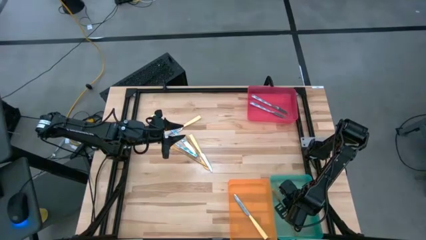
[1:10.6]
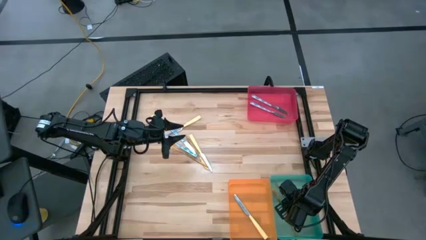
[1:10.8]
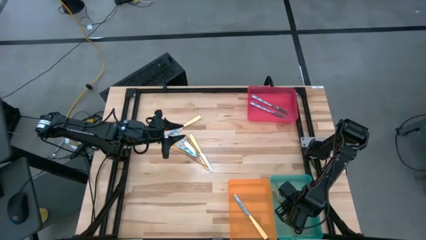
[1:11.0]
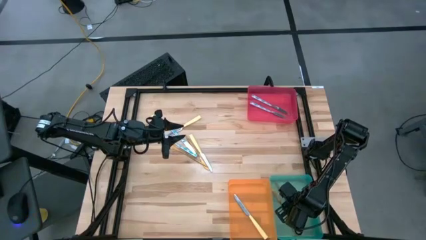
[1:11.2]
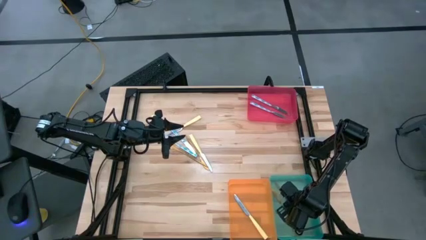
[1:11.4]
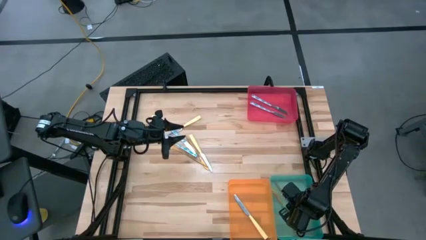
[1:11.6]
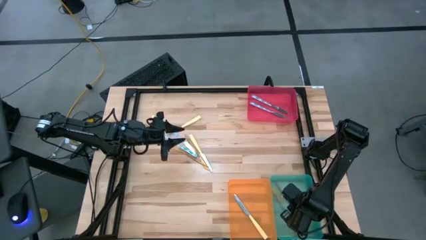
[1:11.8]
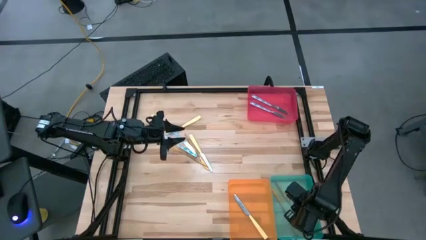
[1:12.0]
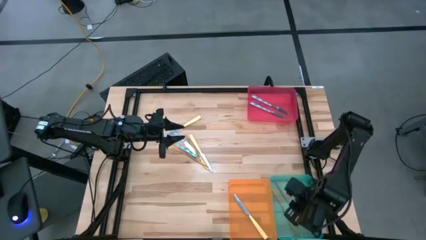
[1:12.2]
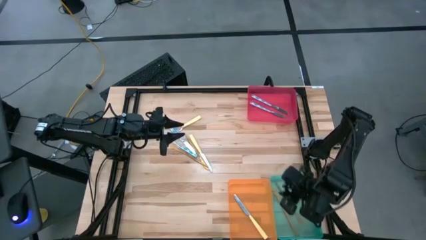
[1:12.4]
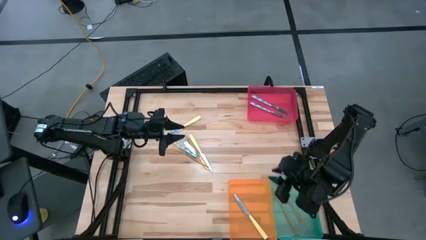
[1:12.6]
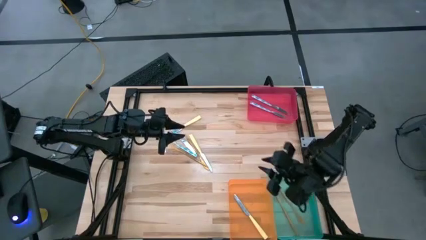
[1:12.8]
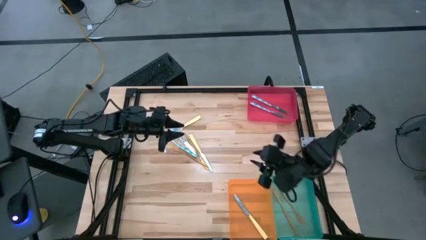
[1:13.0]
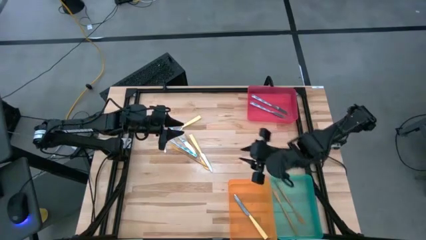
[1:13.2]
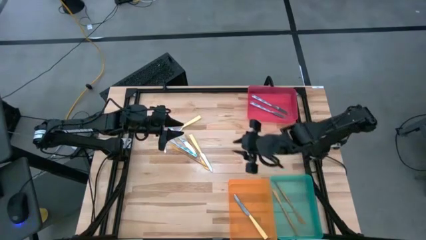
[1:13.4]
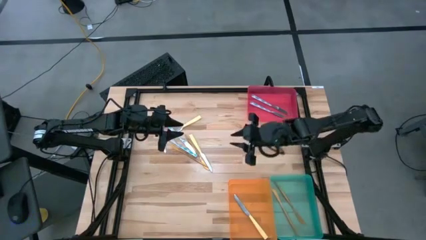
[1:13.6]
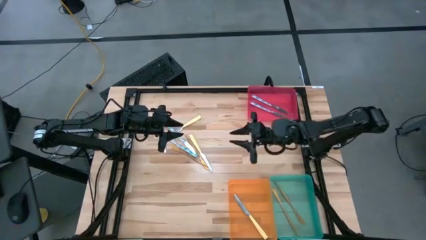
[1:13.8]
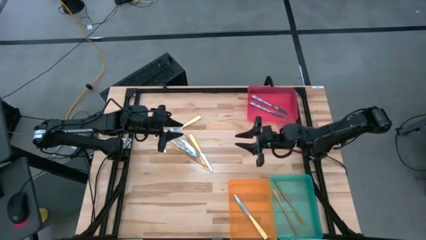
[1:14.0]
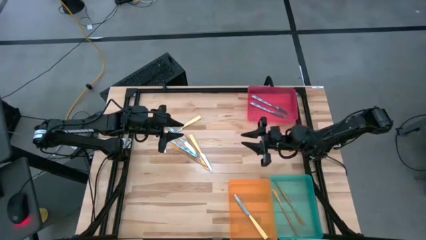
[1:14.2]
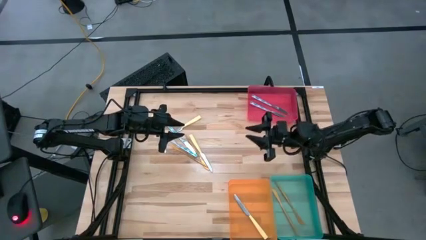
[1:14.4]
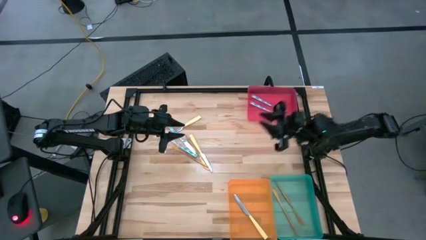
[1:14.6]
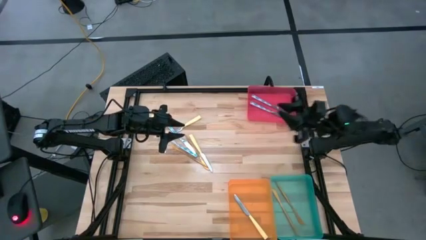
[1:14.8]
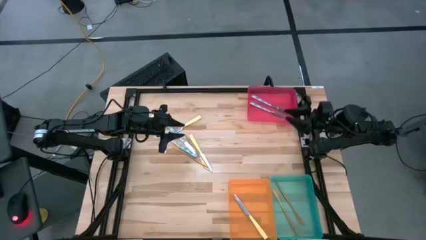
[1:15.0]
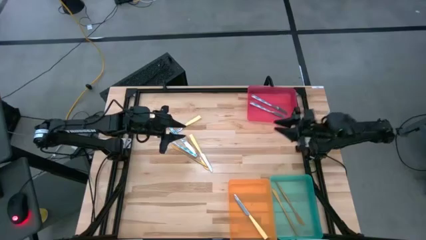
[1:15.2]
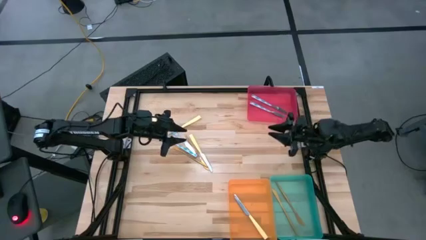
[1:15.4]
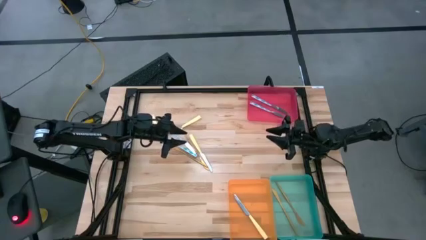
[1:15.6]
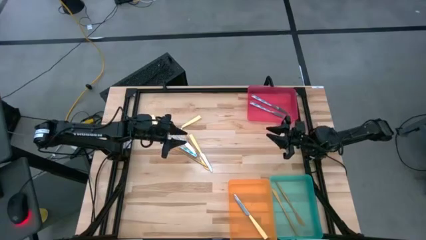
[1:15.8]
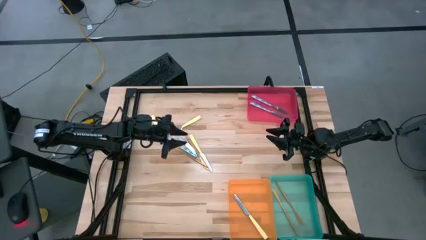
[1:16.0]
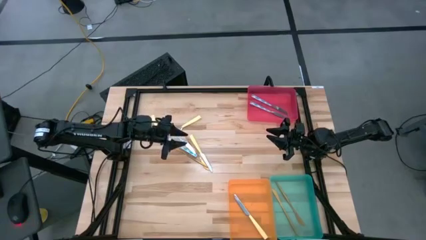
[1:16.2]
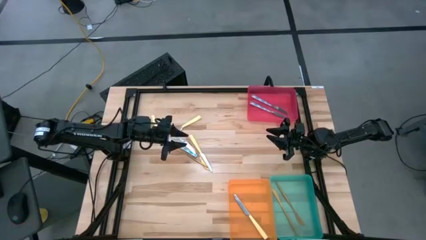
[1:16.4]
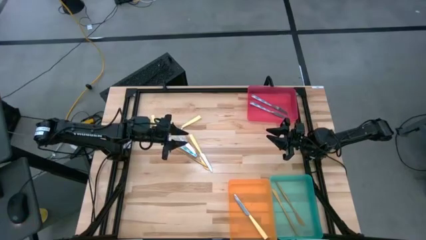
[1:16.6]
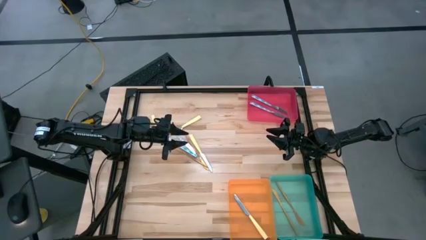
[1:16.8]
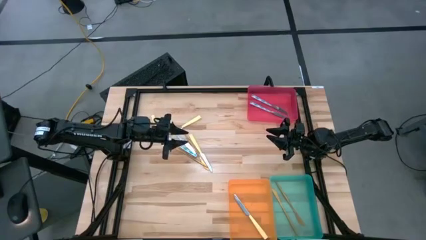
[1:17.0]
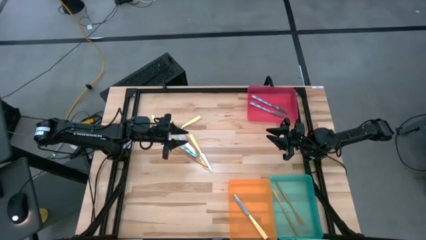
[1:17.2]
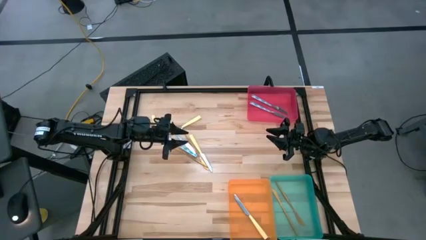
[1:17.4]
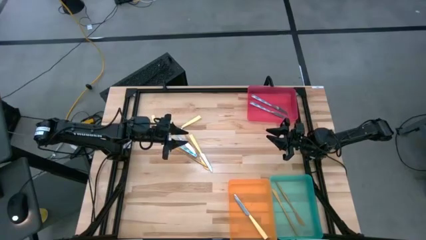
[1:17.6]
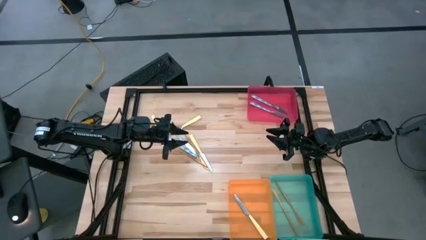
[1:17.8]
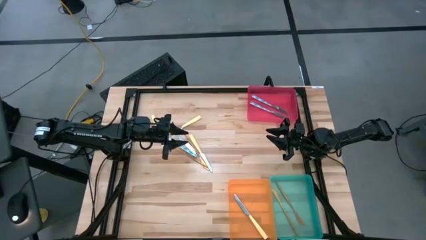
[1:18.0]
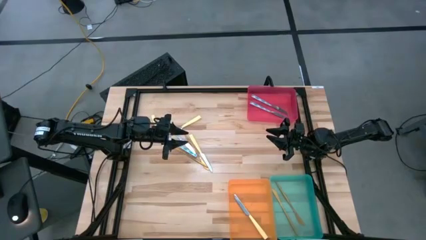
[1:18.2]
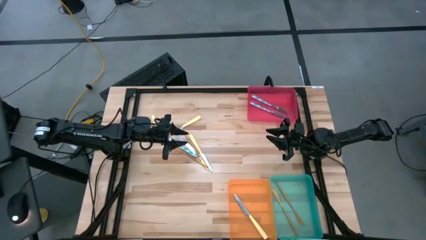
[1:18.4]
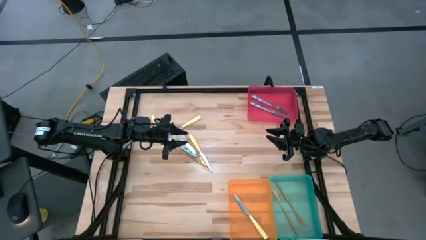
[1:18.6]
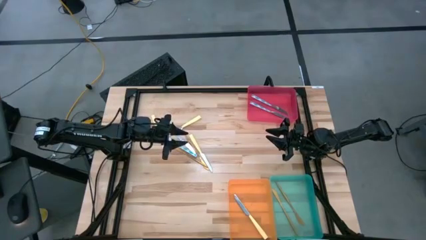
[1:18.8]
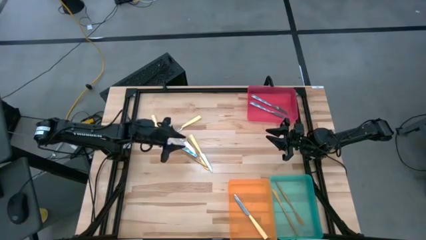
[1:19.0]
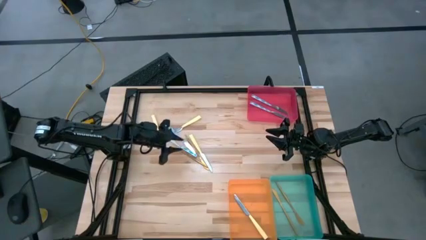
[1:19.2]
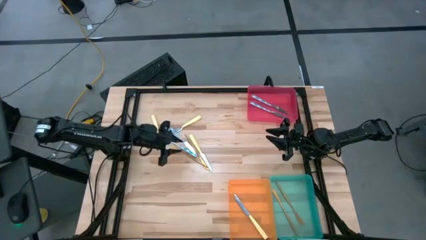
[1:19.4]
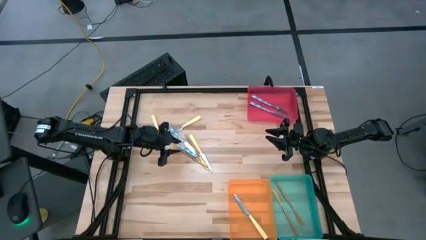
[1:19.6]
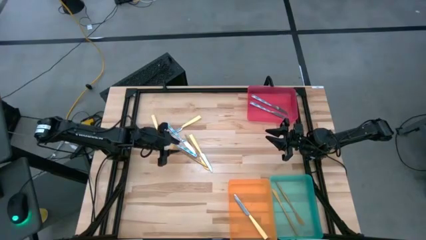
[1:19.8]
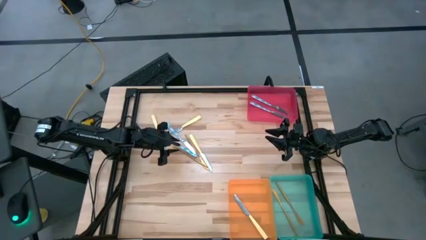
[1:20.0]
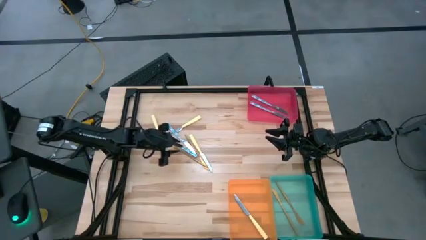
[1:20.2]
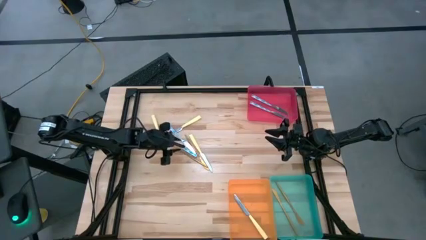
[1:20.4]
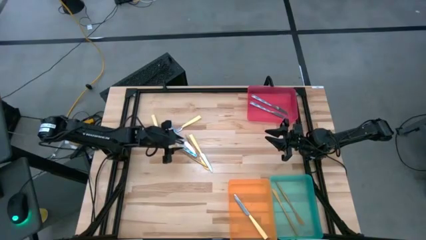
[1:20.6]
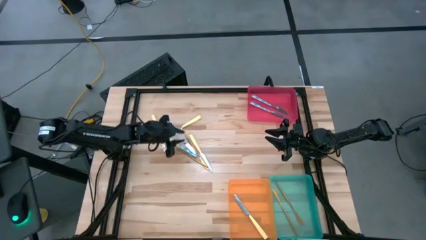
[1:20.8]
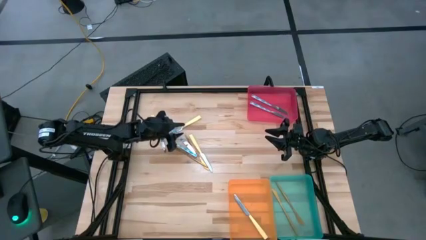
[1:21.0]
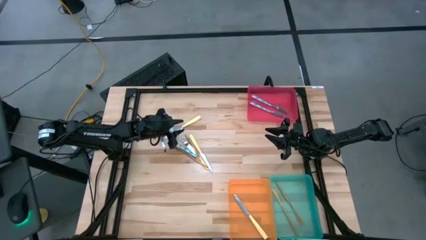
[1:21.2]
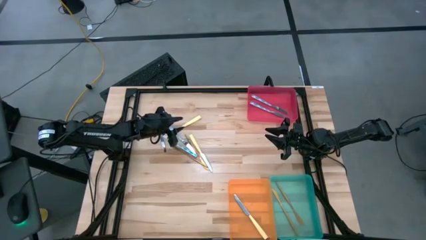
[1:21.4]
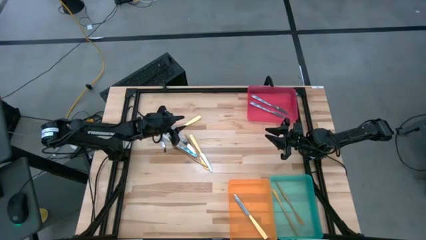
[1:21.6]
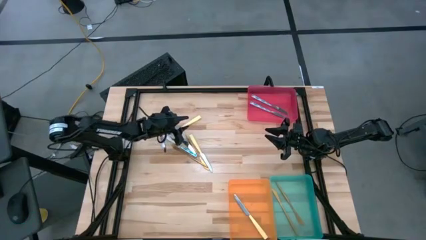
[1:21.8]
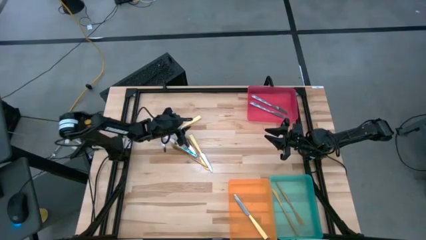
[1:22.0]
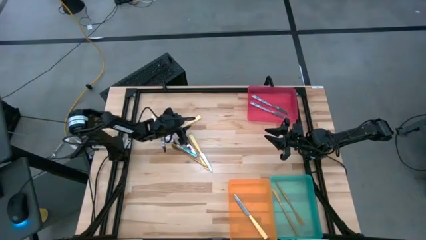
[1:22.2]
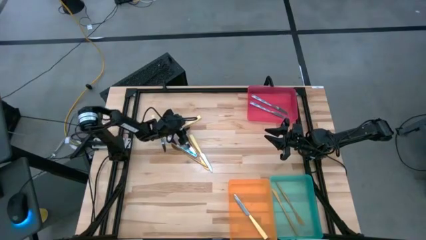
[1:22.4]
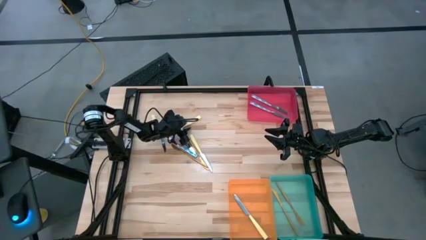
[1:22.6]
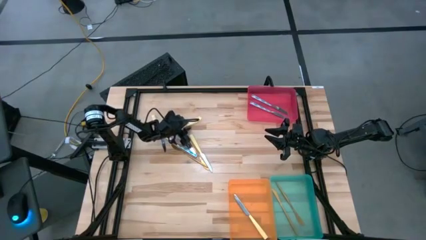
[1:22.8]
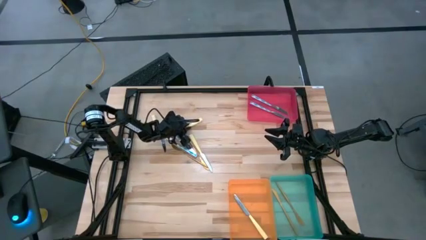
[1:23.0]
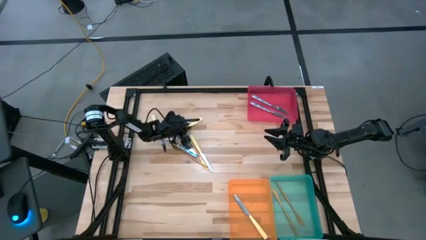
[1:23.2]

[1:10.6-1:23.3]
Task: Sort silverware by color (type)
Put the yellow knife into the orange bin
